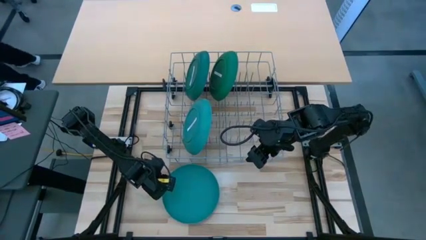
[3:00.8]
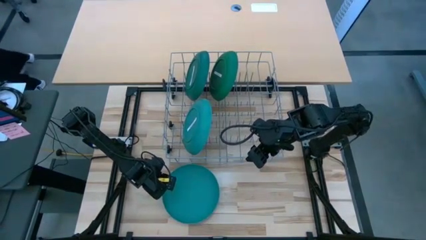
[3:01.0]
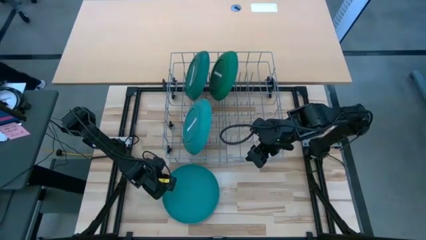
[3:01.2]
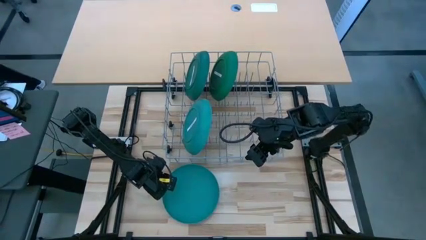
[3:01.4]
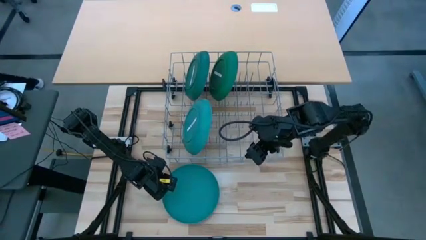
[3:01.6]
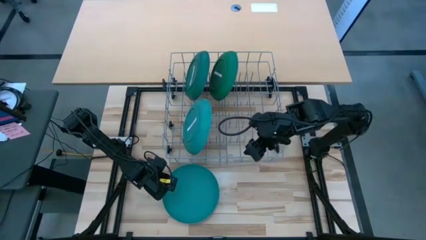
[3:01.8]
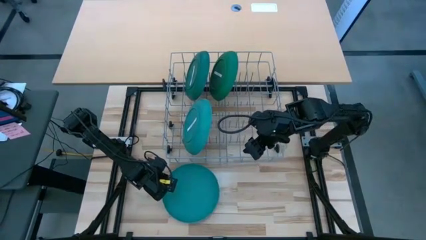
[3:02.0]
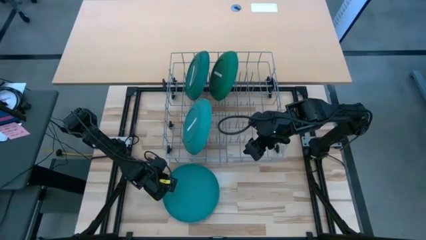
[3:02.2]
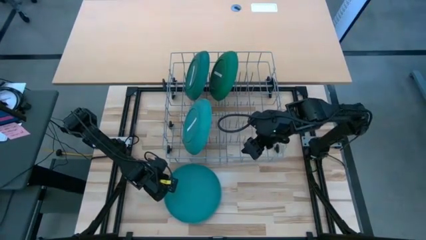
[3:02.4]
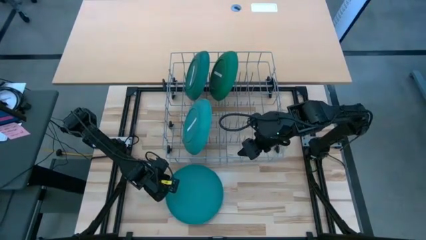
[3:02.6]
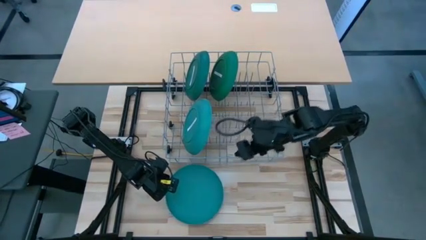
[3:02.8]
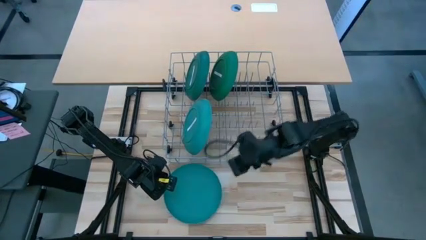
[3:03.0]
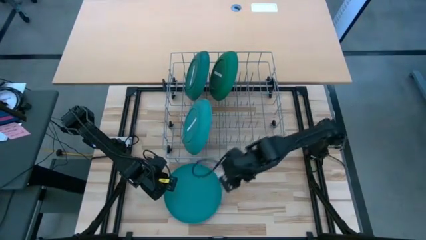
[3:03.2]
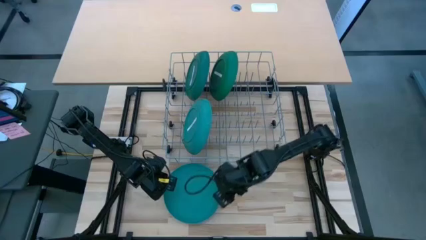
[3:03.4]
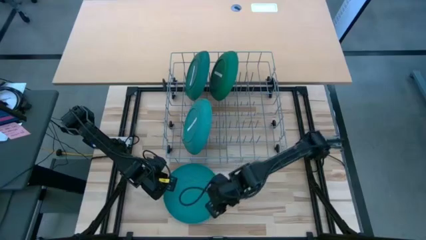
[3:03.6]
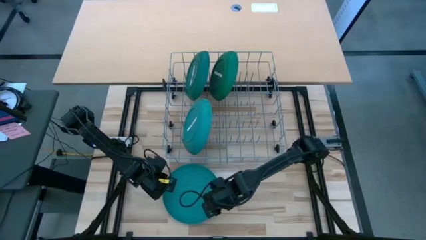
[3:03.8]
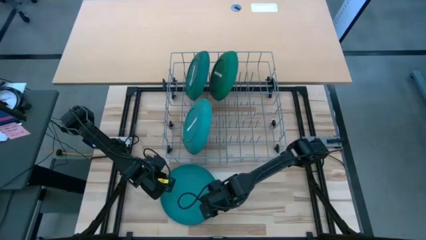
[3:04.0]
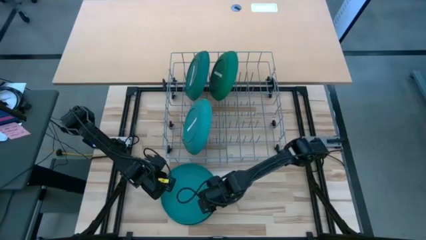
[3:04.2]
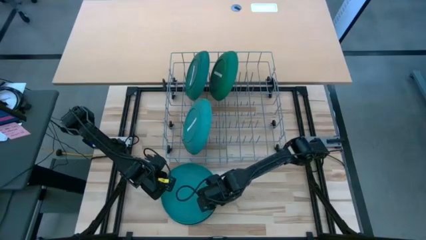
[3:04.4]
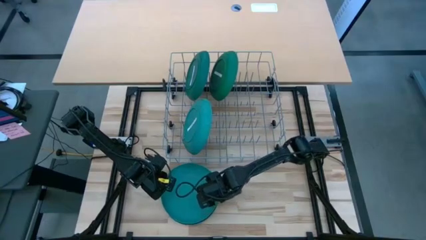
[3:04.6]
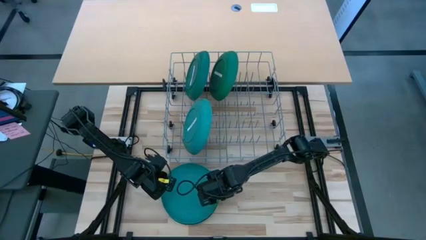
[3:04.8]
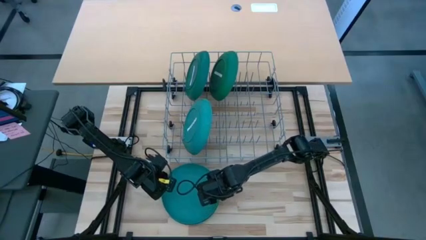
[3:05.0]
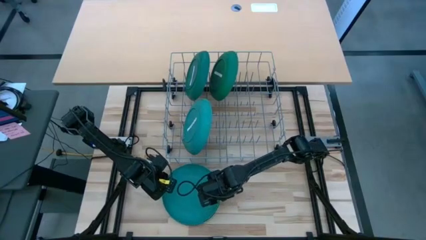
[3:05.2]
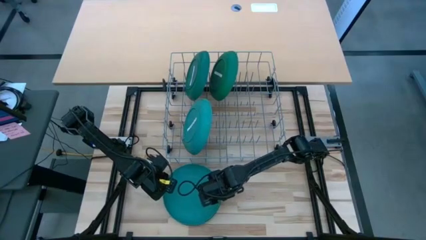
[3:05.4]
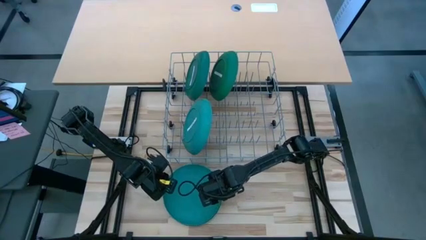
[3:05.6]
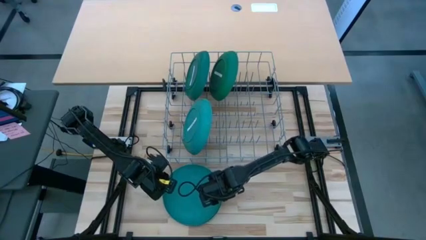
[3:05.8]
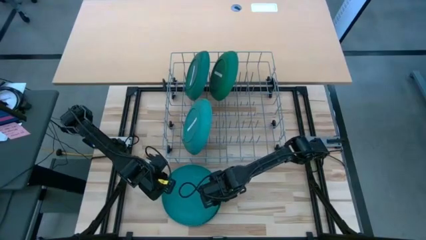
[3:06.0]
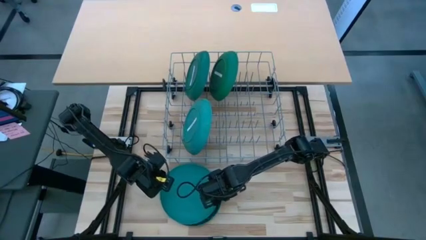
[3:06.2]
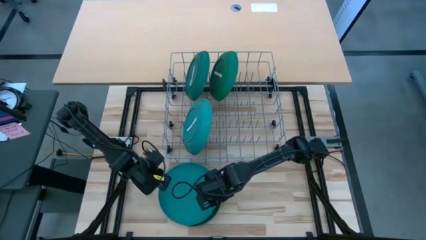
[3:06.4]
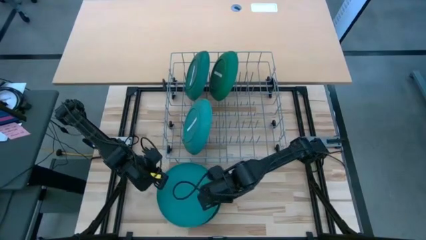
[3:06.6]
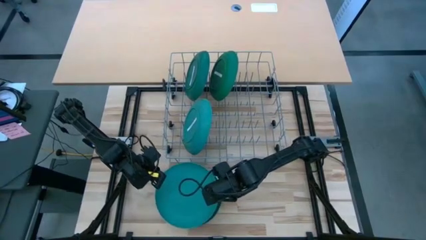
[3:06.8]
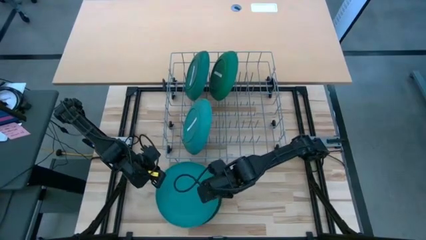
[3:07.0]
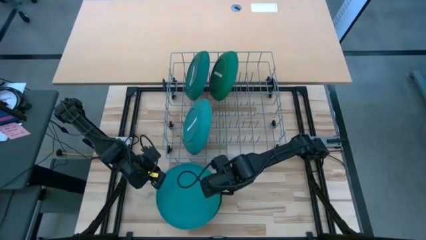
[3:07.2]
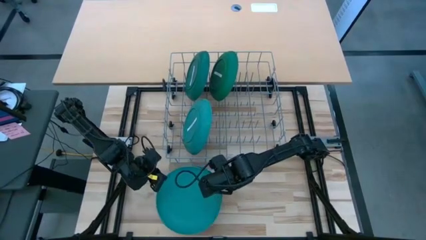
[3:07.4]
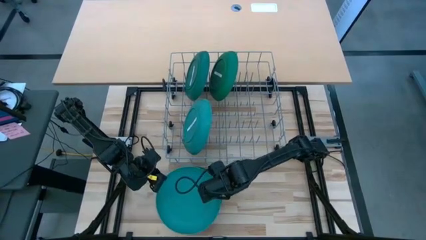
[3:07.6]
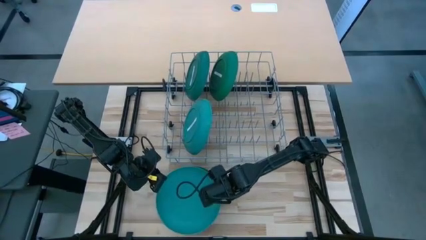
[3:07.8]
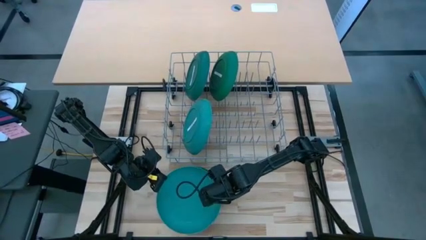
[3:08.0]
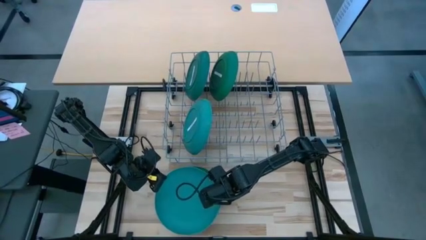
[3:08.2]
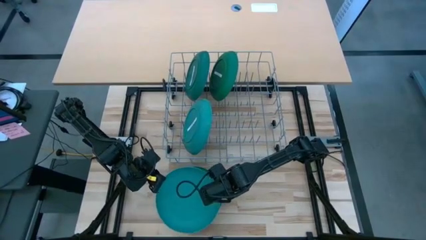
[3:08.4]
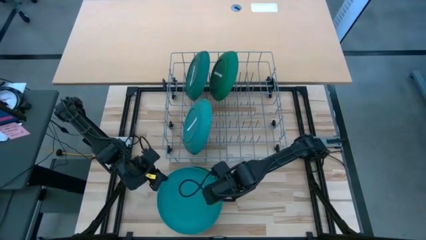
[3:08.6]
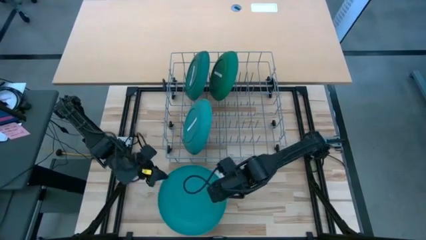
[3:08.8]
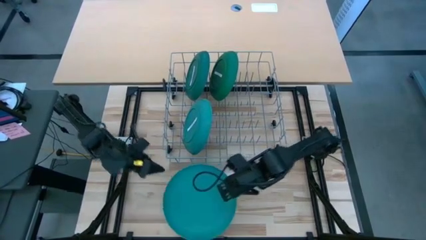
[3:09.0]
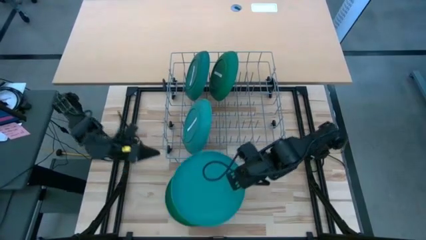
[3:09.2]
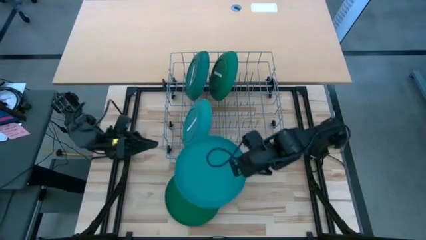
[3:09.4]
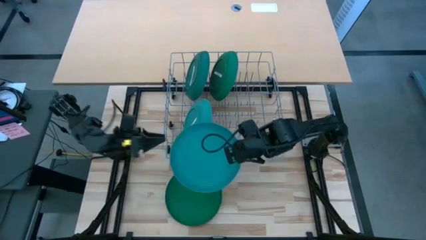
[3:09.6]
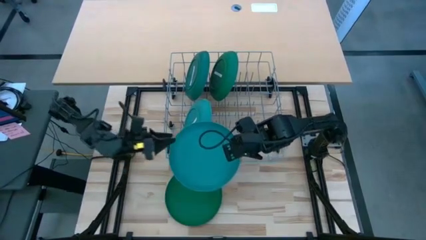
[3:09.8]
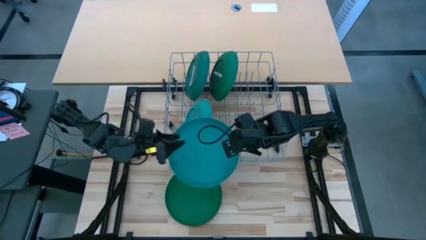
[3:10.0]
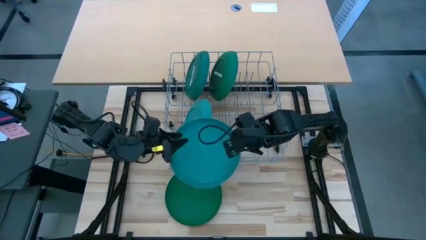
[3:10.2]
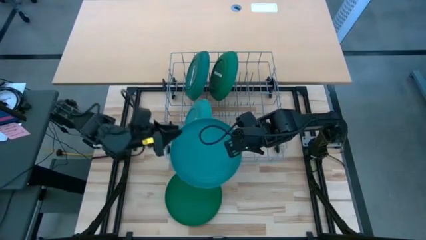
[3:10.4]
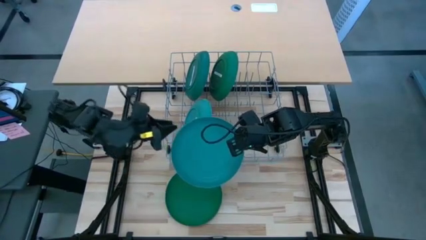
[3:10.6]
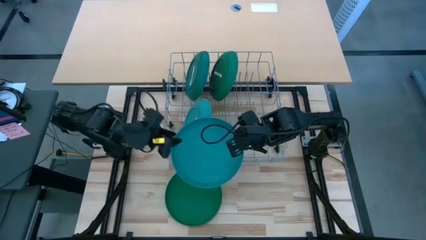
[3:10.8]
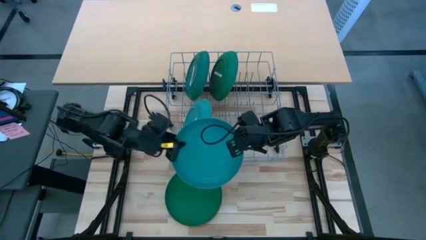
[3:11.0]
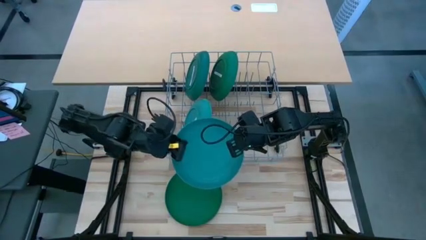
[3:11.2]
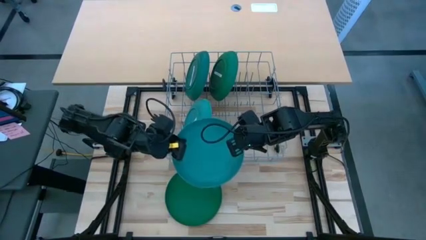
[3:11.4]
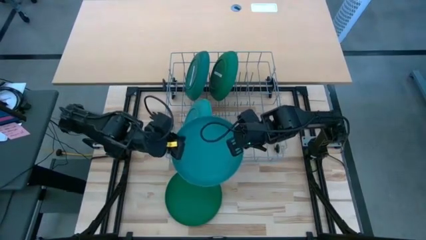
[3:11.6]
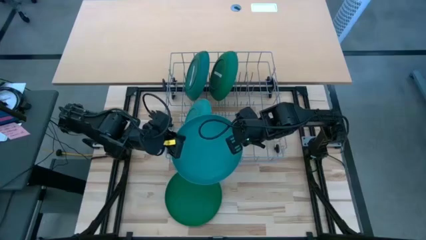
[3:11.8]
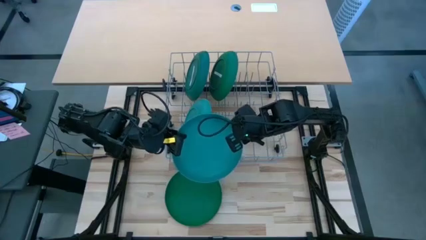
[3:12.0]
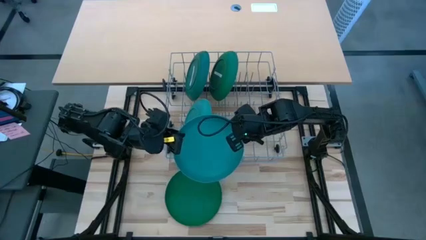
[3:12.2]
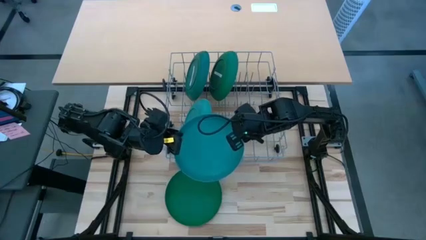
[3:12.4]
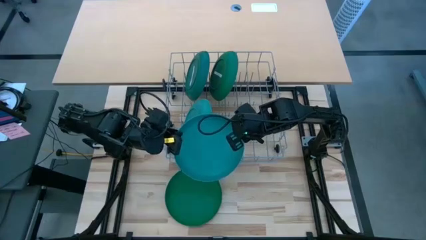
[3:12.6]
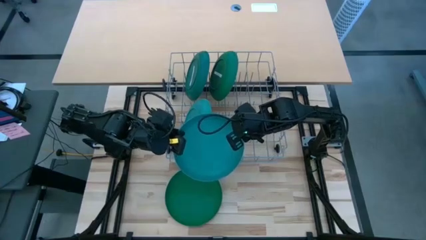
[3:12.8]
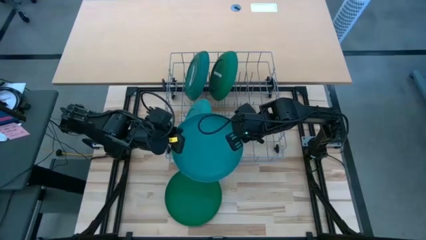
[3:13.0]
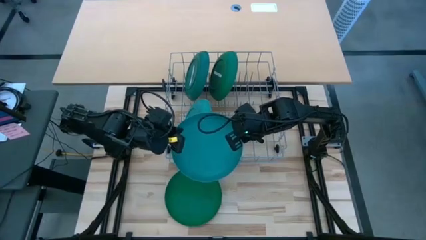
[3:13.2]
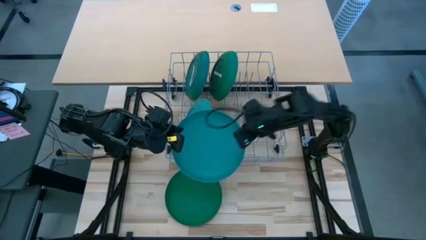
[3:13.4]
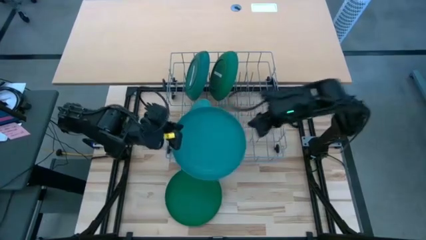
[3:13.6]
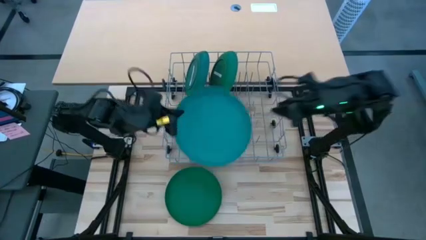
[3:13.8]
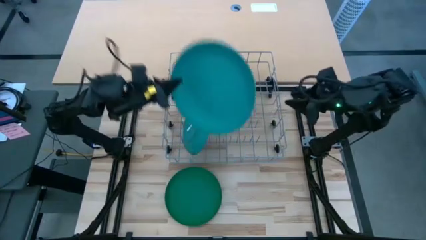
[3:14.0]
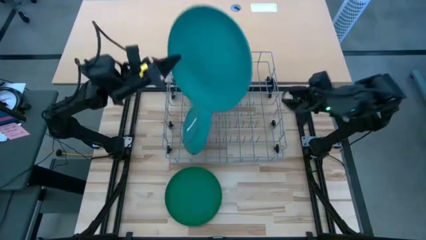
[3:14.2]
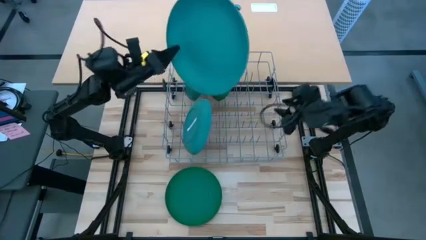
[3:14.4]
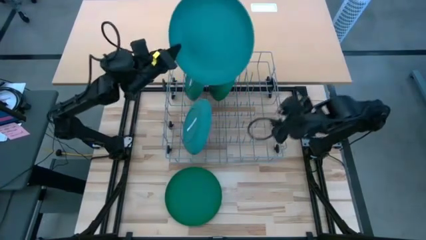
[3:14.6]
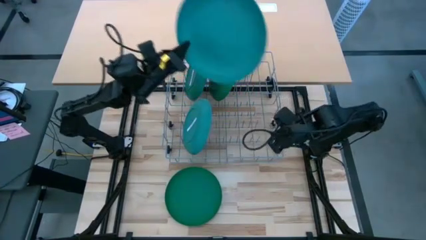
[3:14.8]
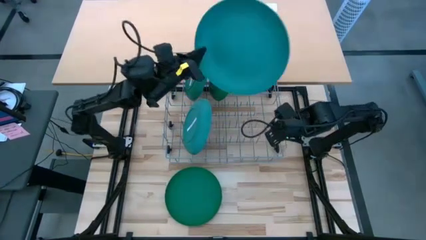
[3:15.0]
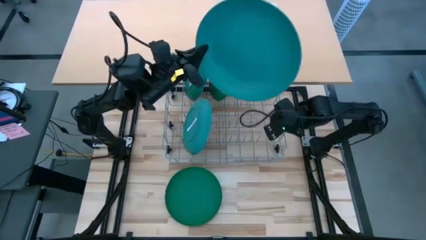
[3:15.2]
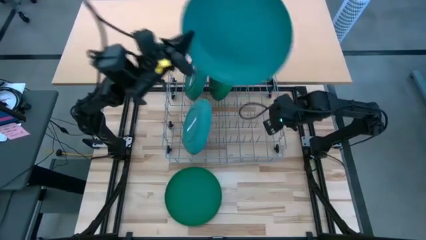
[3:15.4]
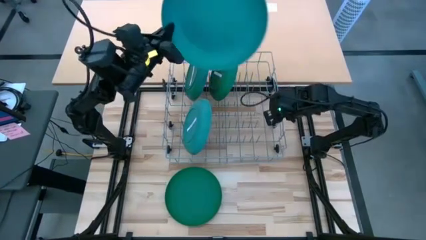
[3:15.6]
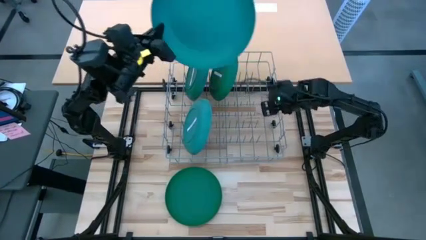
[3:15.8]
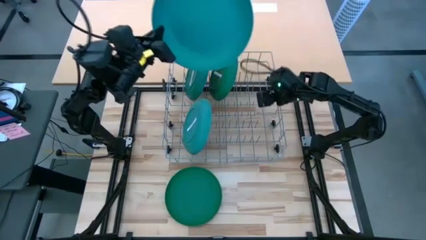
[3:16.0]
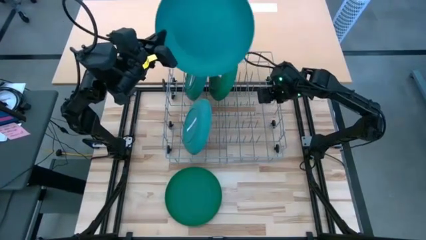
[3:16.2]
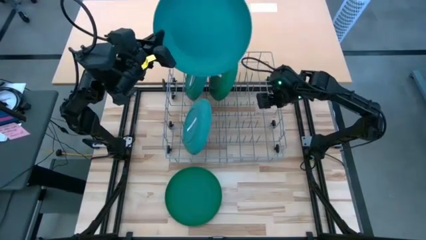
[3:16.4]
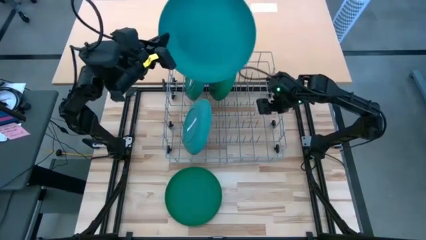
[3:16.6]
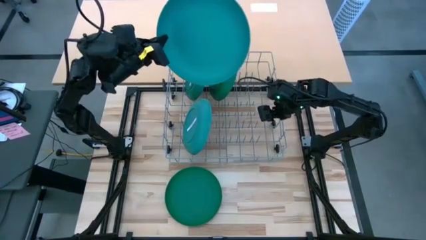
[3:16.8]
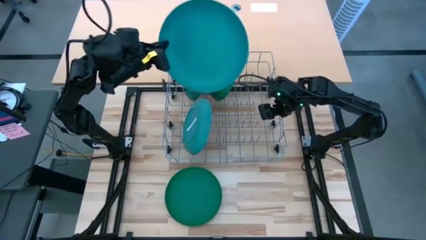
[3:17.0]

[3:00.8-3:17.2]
Task: Sort dishes
Put the blue plate into the dish rack

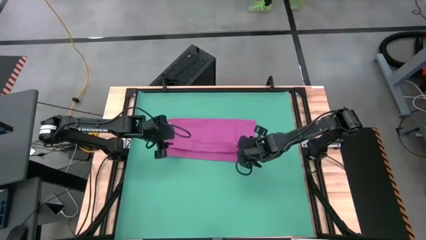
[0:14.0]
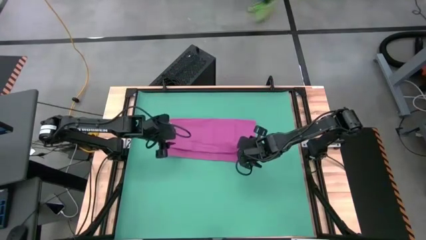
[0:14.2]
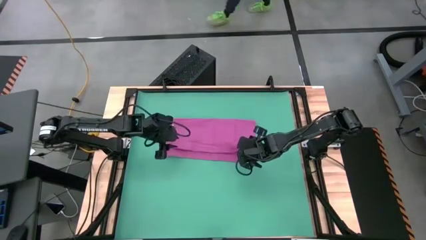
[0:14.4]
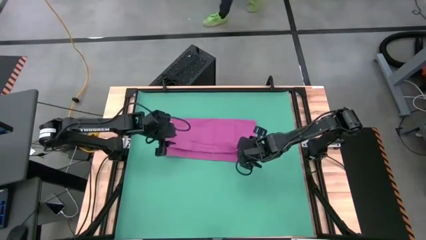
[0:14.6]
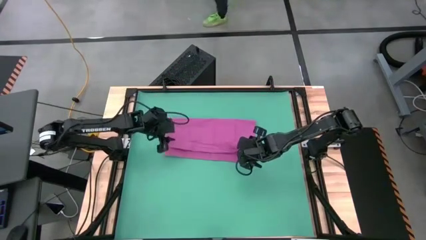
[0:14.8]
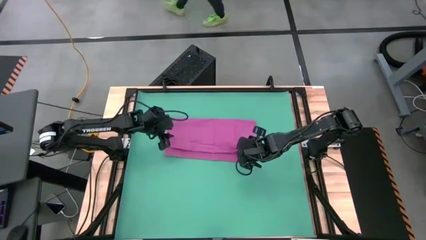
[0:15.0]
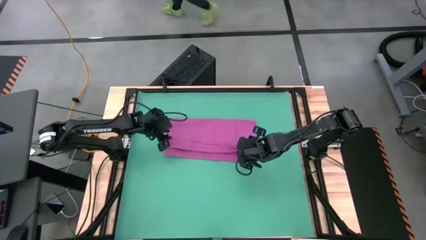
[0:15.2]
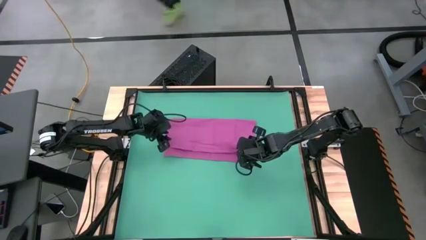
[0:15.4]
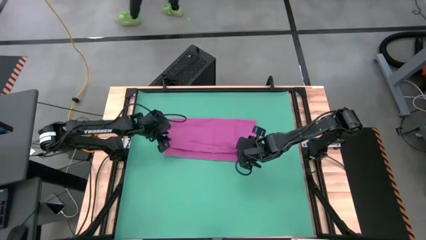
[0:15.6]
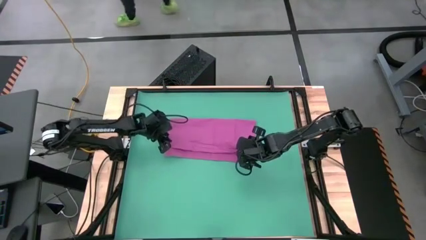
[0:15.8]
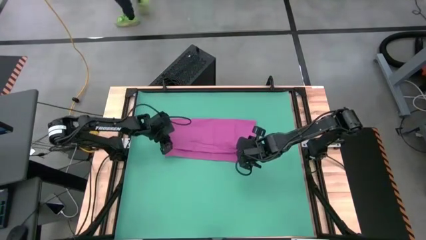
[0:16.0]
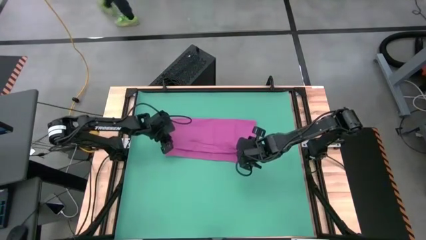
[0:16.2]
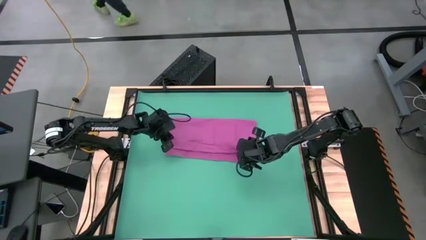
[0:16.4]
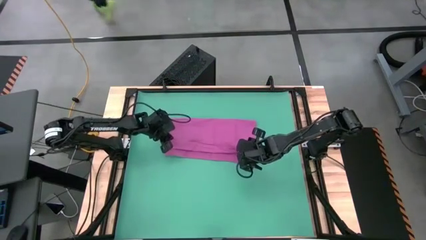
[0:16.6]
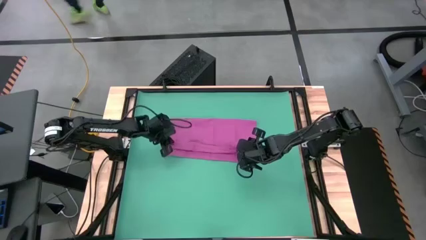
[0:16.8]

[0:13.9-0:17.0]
Task: Roll towel
Fold the pink towel
